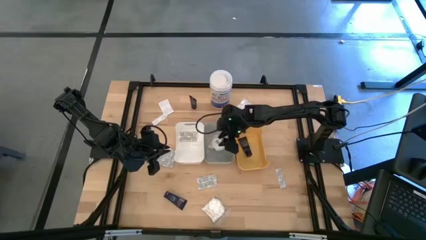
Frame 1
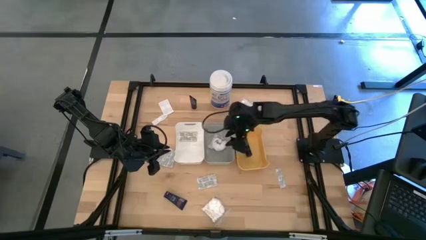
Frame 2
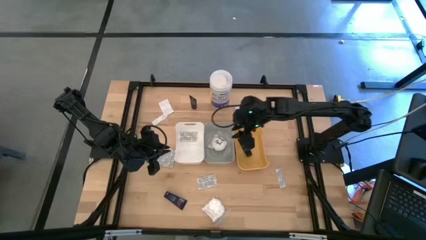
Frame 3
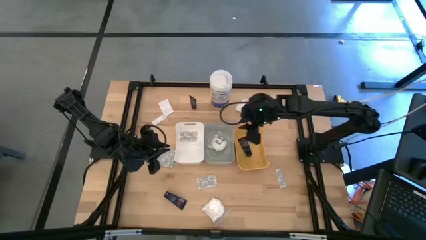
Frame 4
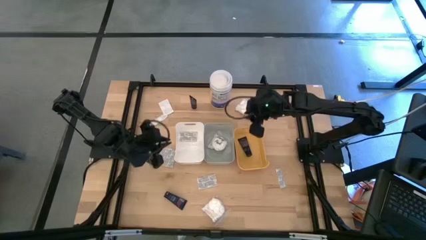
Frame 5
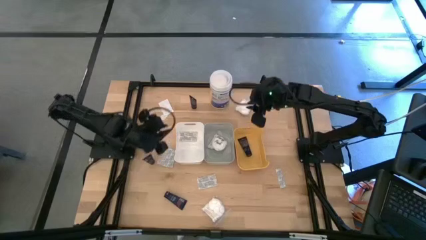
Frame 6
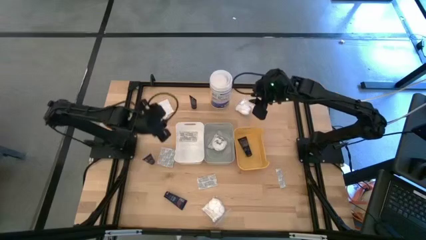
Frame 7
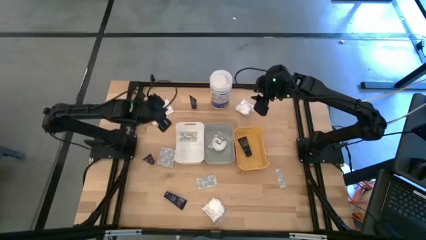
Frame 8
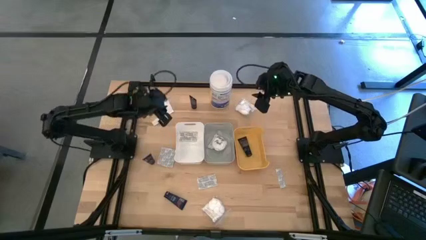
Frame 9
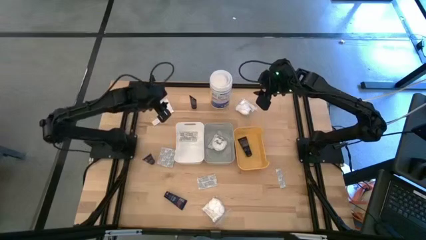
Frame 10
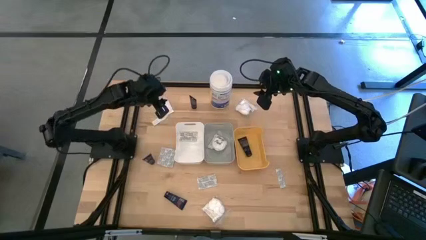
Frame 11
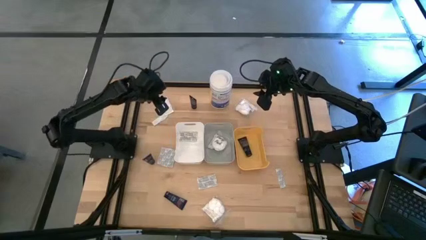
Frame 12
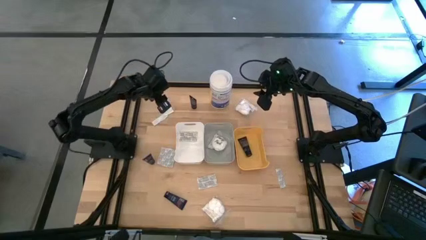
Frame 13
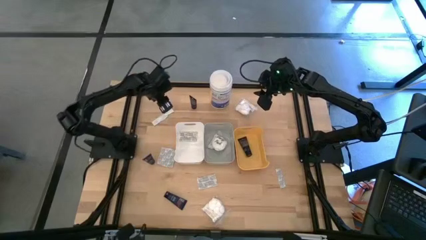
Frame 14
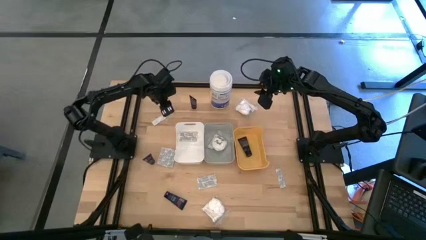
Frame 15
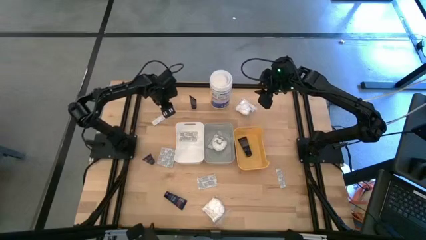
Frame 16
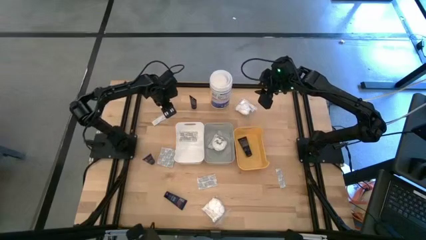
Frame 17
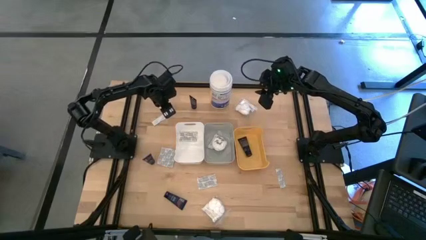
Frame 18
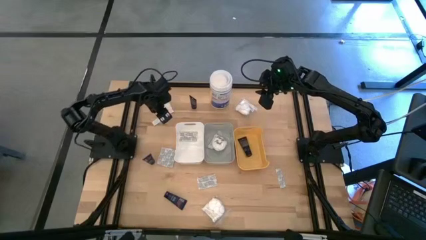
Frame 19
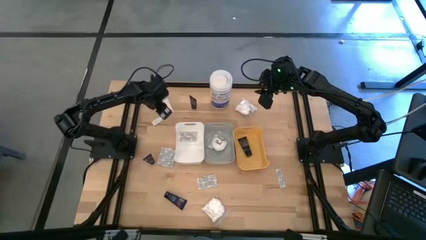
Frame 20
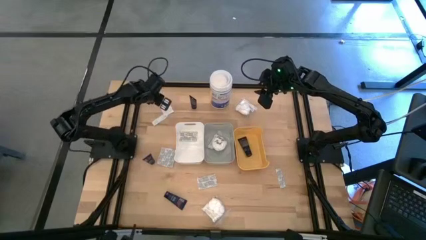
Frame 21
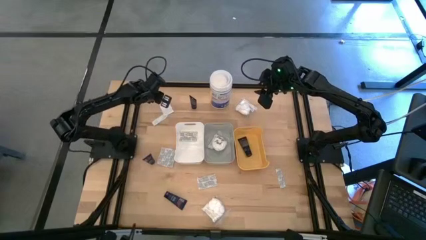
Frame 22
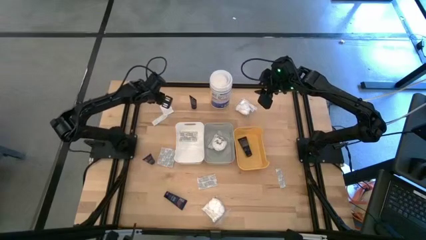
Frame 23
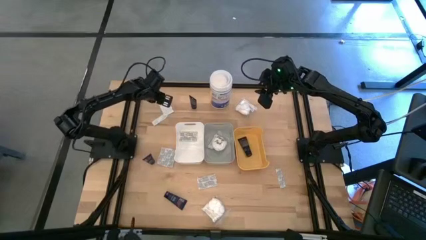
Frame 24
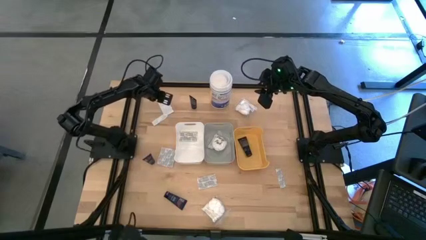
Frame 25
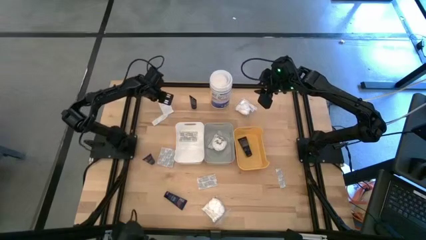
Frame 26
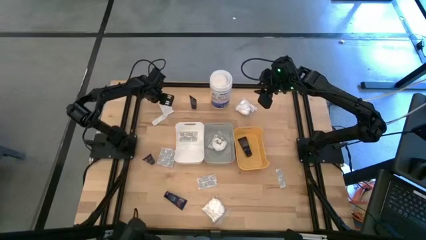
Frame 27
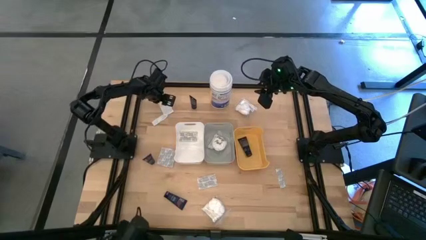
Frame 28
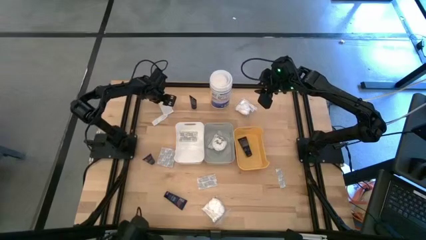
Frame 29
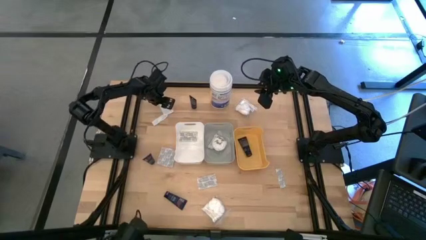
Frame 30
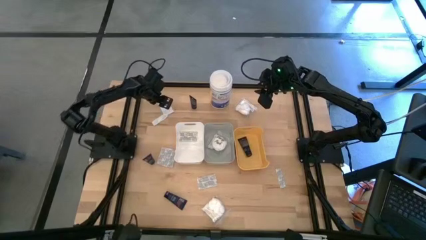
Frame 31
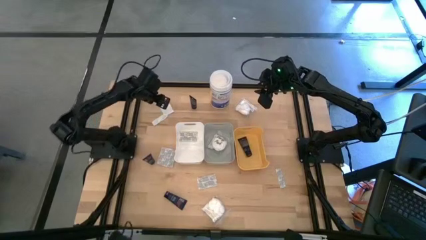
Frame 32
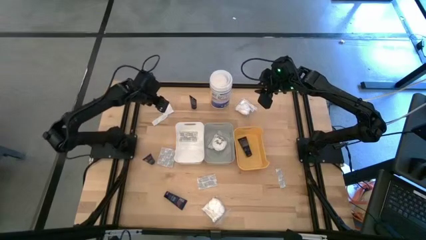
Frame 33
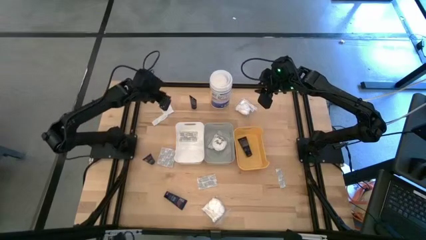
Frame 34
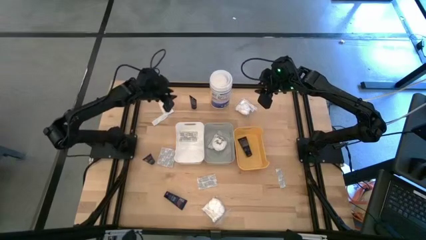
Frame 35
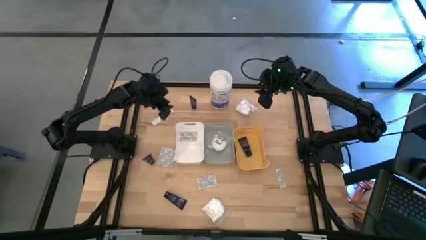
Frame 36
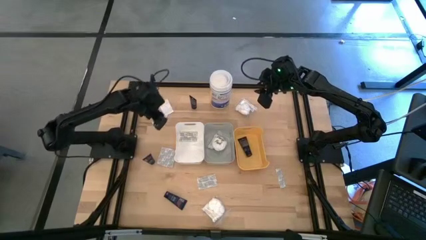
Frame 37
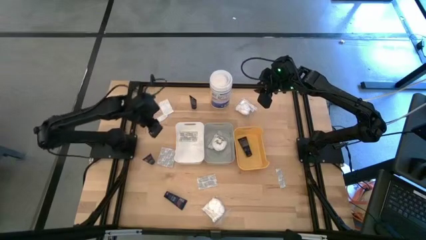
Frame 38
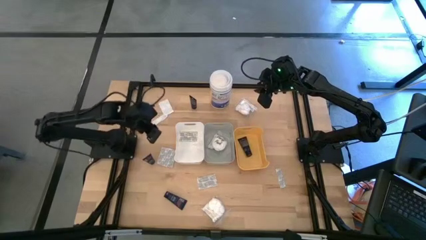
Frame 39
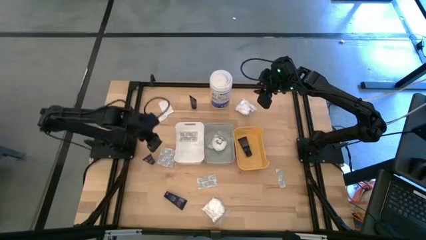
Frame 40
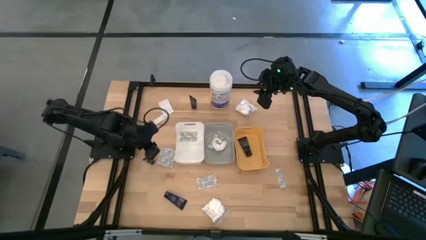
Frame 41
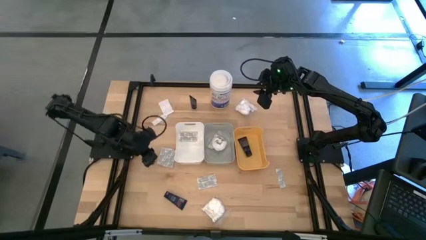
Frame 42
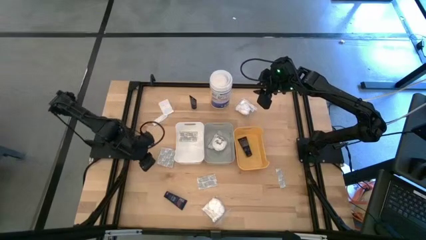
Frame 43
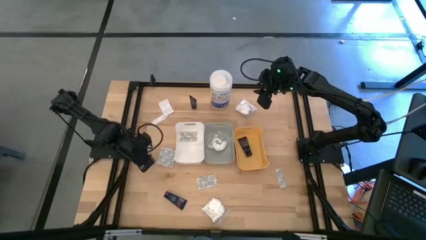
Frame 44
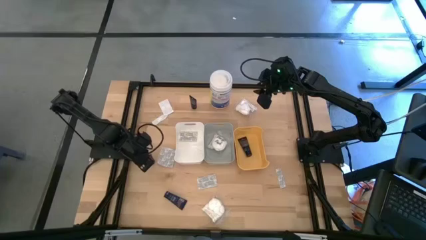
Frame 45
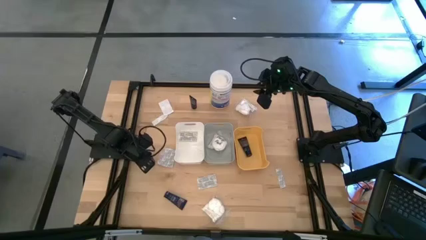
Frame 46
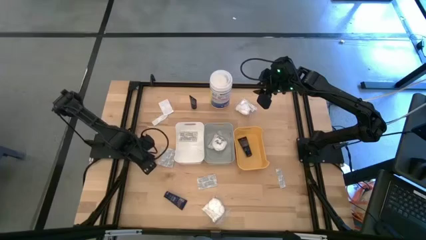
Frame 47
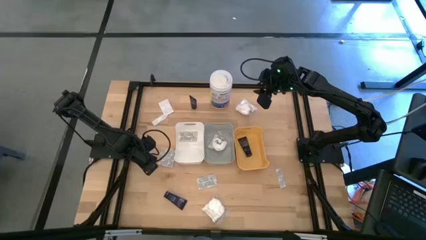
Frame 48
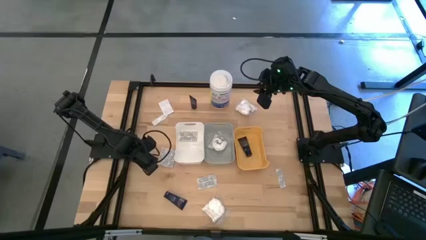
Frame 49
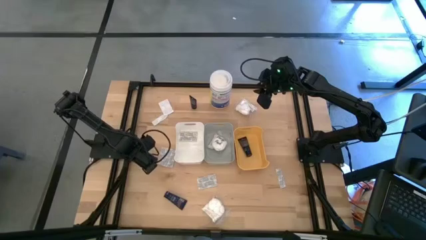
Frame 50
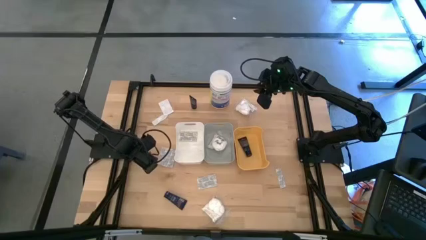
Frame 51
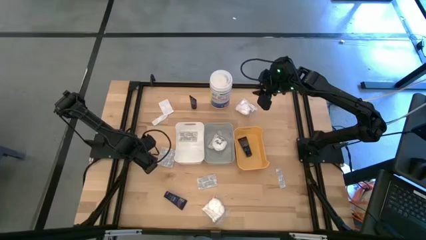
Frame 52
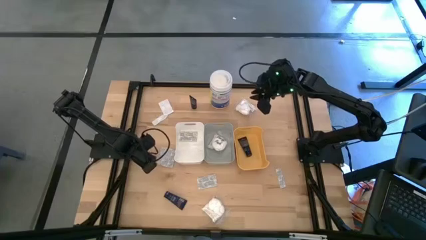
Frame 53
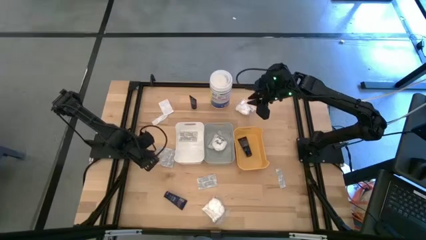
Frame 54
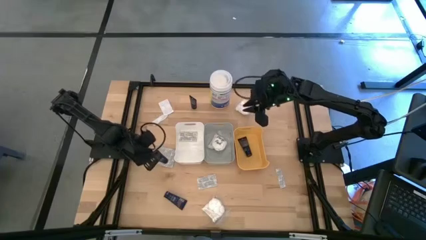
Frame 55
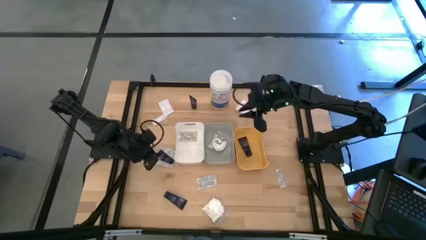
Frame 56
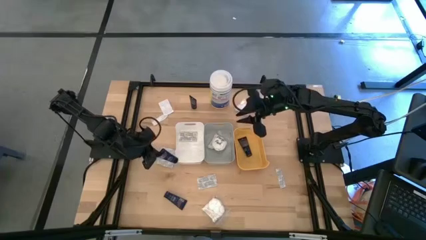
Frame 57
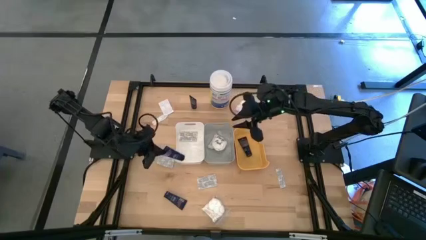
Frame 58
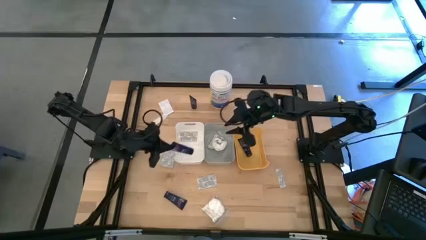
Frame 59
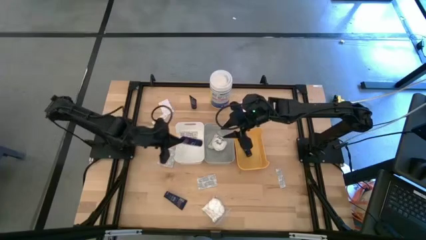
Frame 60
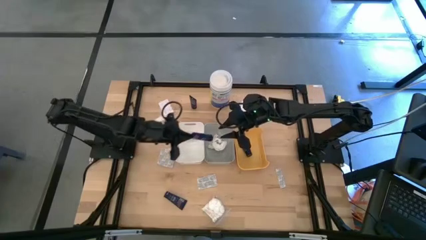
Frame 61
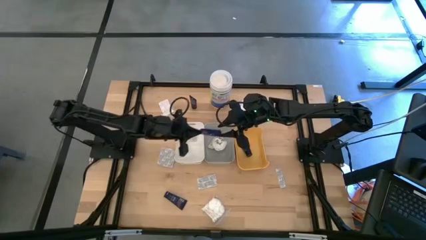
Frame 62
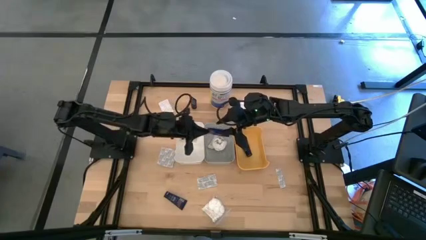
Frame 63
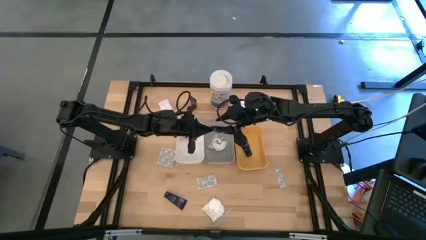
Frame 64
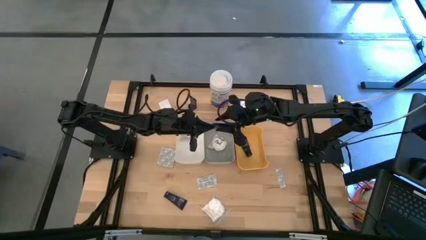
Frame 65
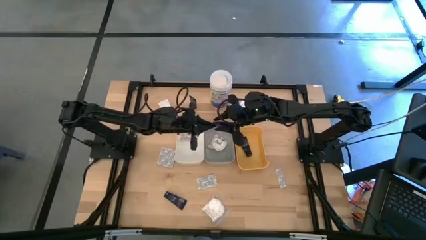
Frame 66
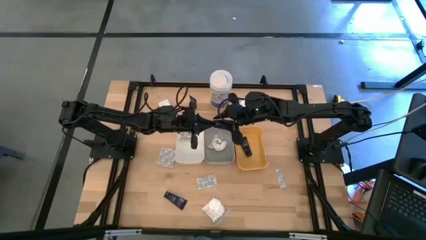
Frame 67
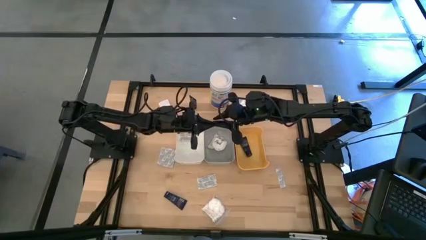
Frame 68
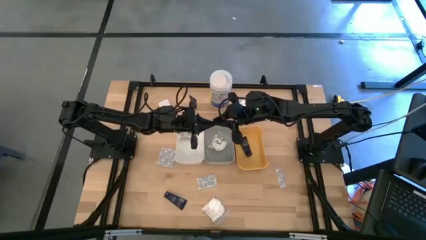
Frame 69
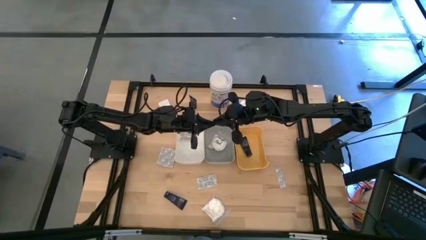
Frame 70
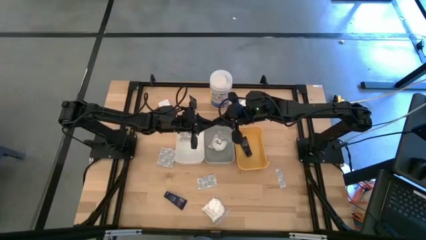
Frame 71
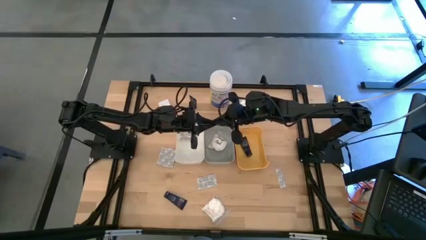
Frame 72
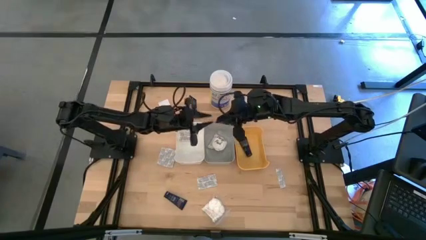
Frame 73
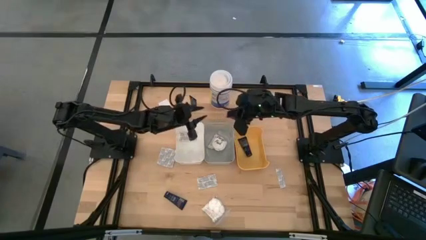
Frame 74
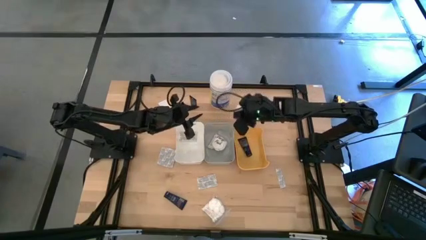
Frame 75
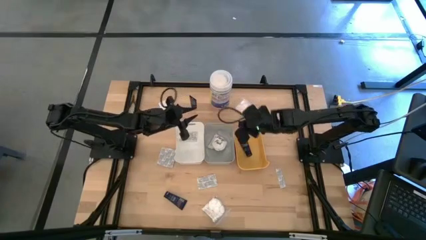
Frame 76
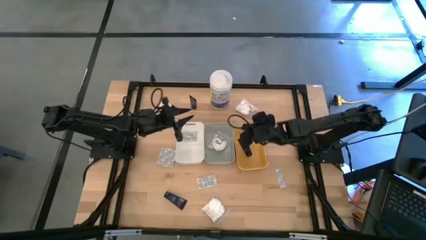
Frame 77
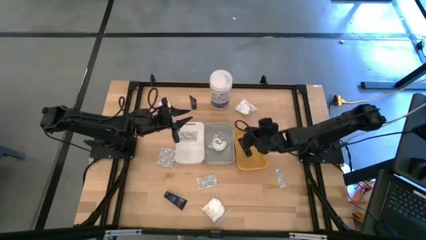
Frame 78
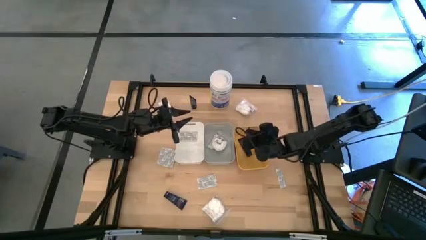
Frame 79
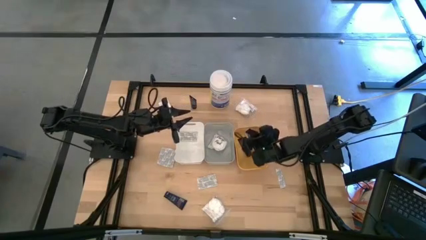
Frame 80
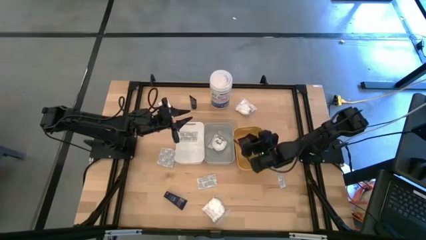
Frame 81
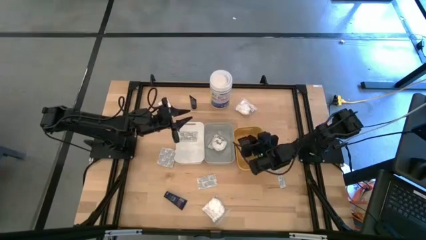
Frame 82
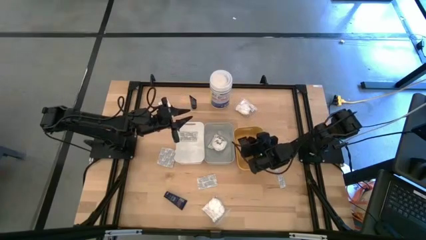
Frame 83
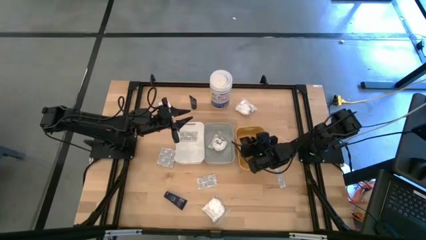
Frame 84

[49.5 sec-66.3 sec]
Task: Pick & Place Travel size toiletries
Put the blue shave cream into the yellow bin

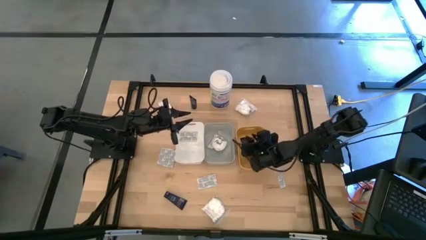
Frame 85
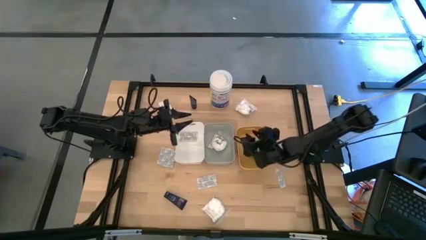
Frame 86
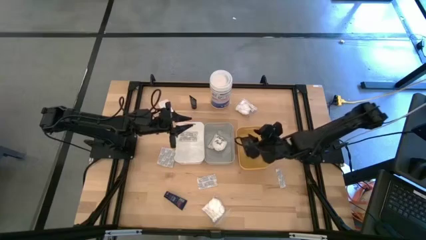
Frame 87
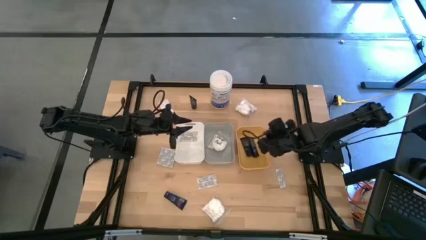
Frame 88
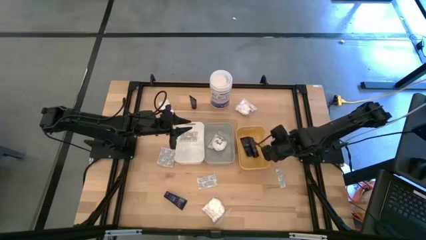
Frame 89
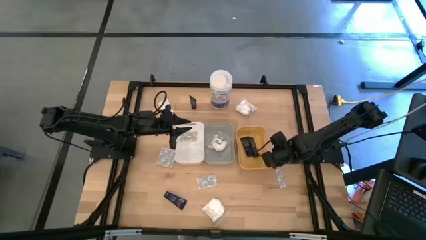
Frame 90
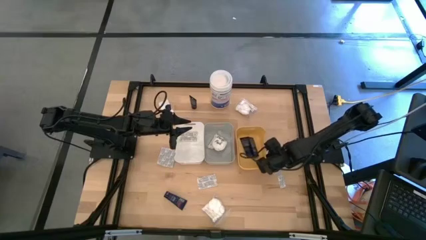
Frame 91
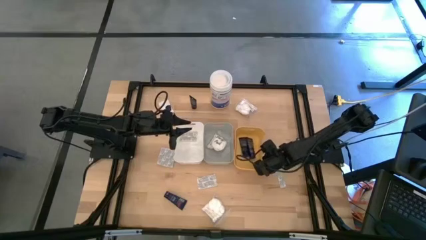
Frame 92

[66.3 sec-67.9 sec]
Adjust the yellow bin on the table
